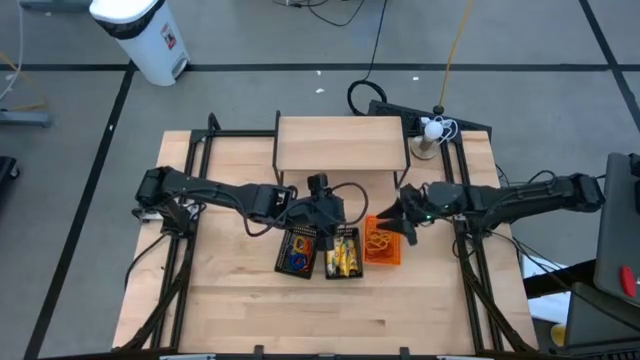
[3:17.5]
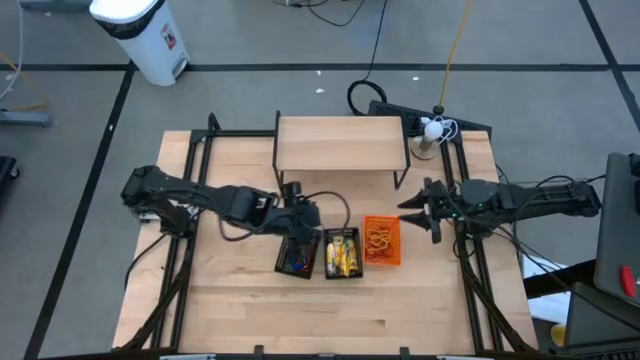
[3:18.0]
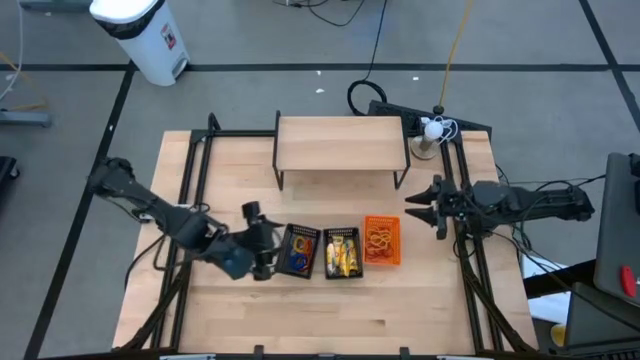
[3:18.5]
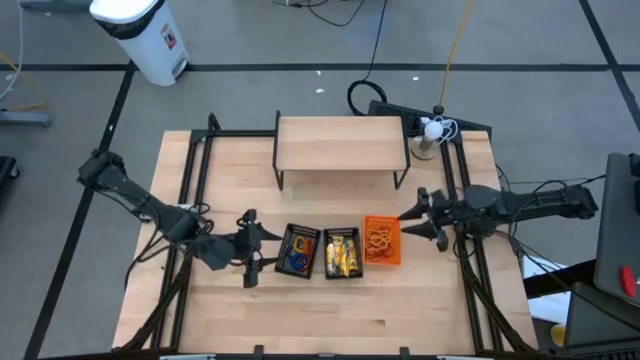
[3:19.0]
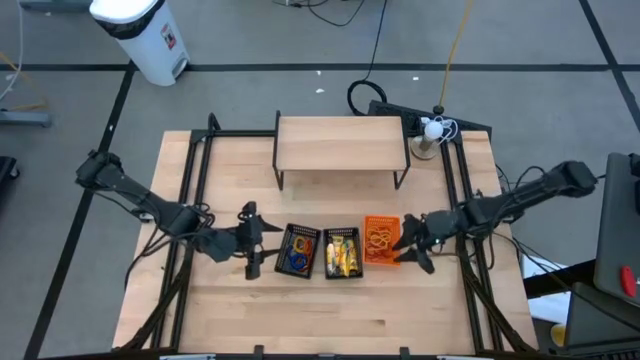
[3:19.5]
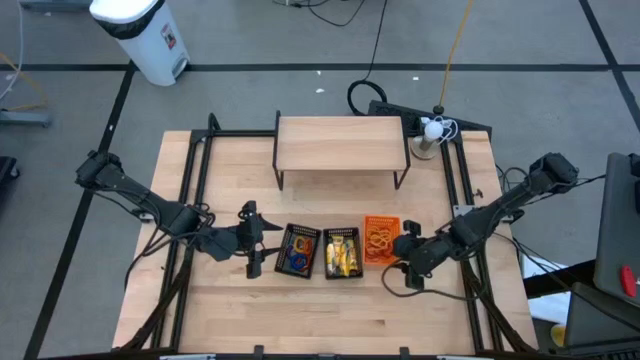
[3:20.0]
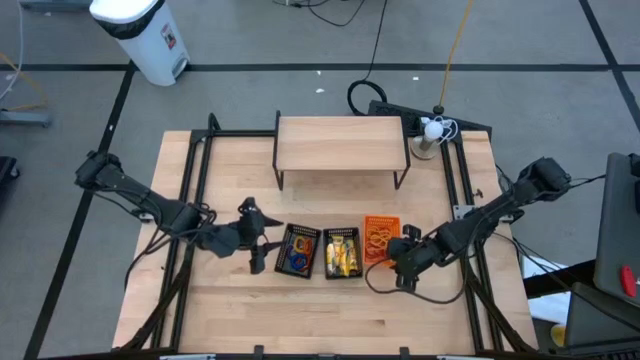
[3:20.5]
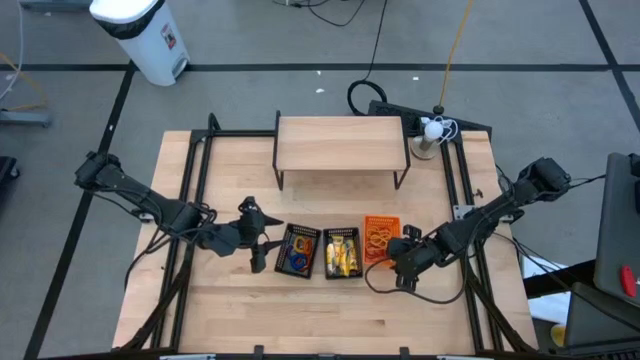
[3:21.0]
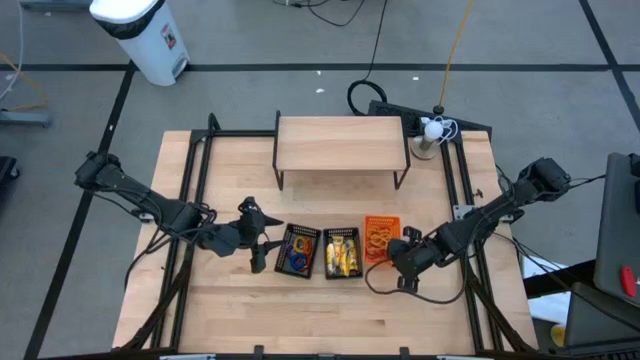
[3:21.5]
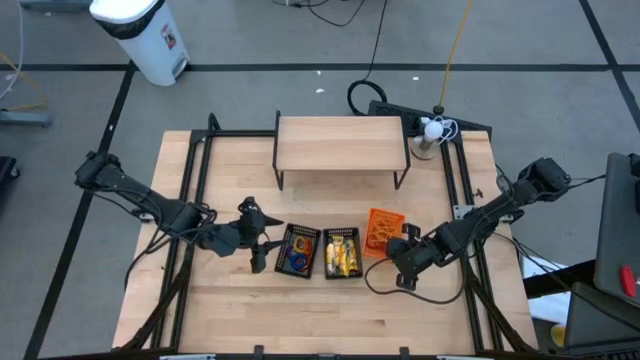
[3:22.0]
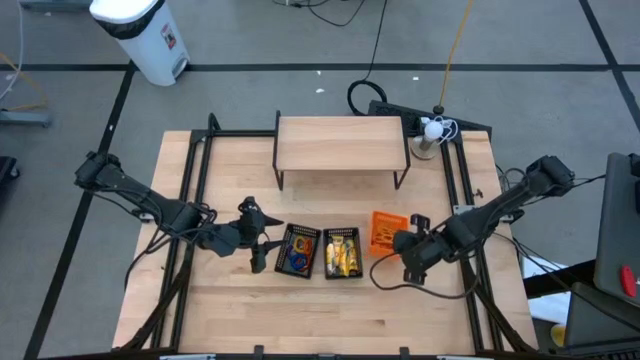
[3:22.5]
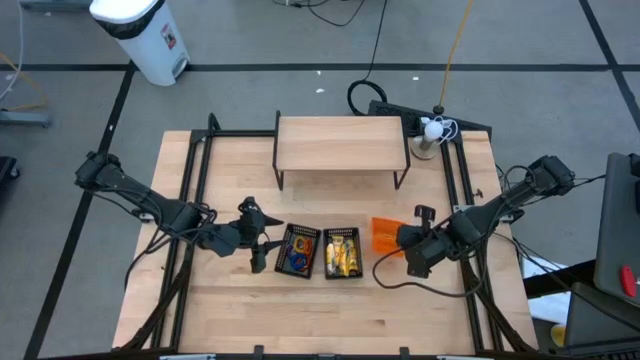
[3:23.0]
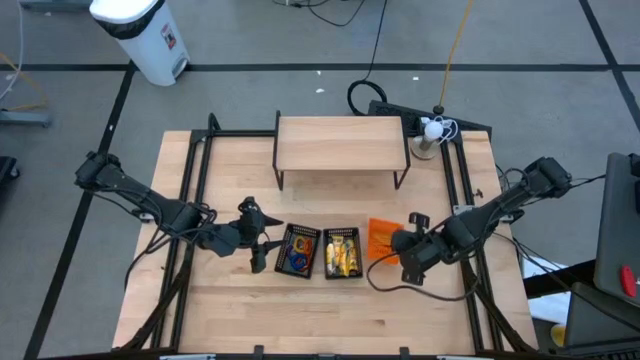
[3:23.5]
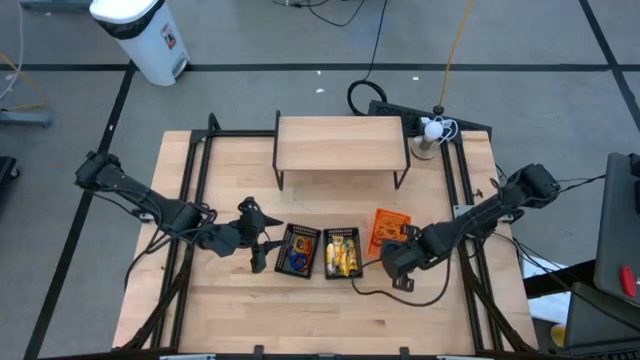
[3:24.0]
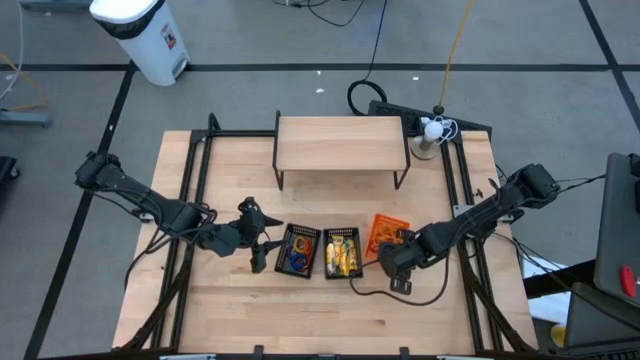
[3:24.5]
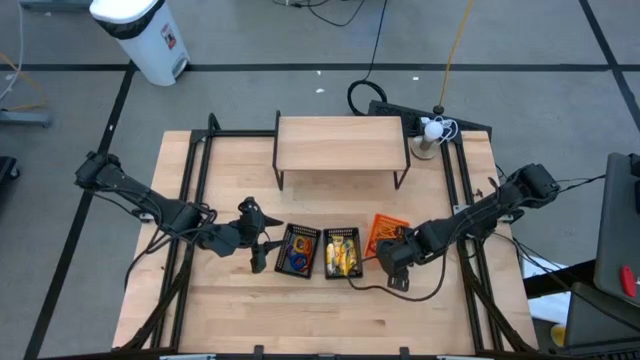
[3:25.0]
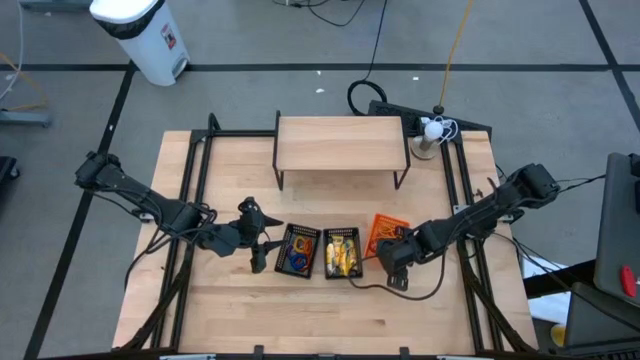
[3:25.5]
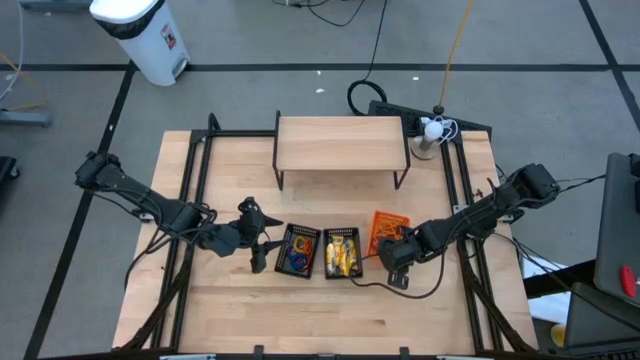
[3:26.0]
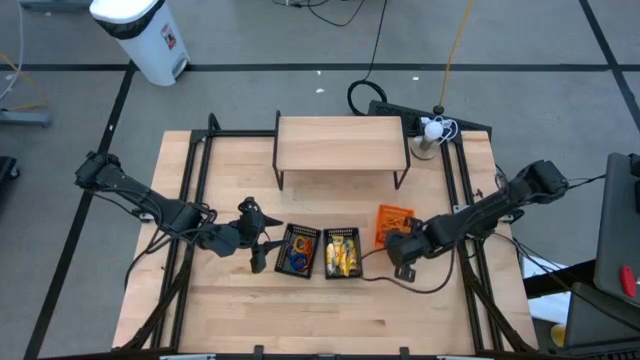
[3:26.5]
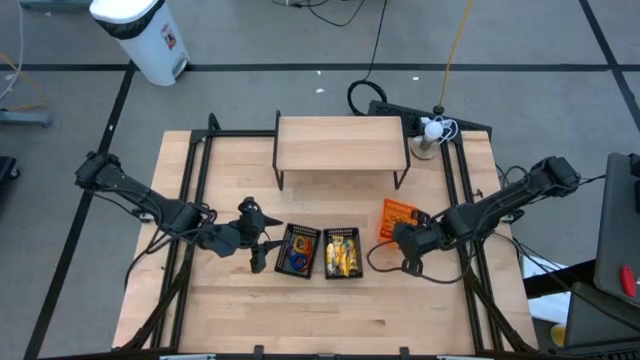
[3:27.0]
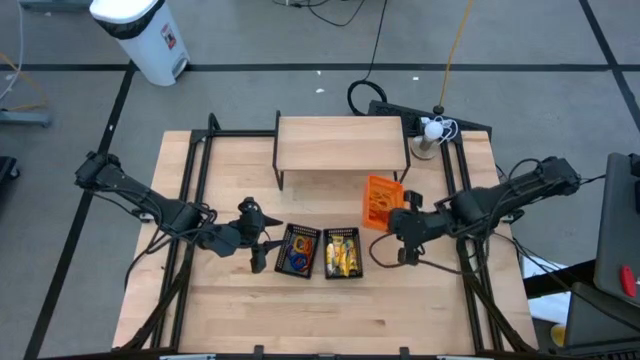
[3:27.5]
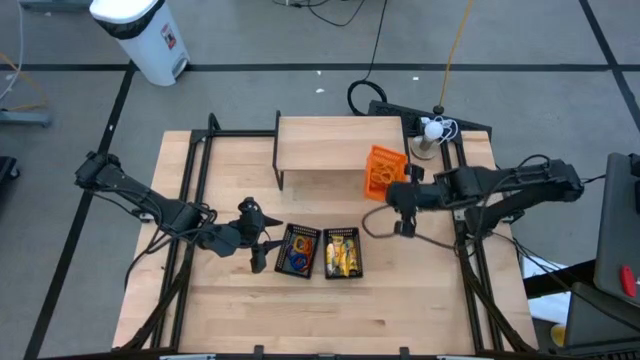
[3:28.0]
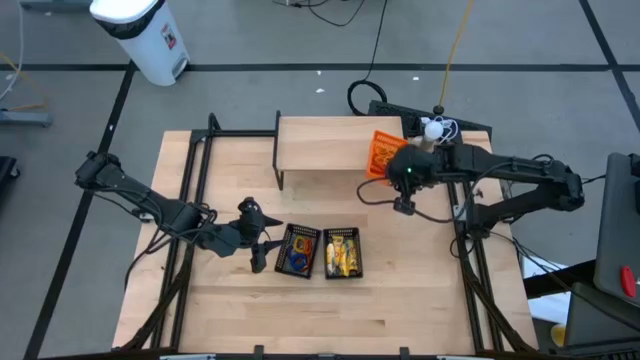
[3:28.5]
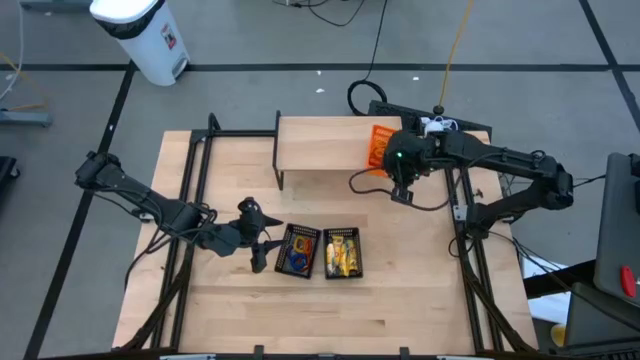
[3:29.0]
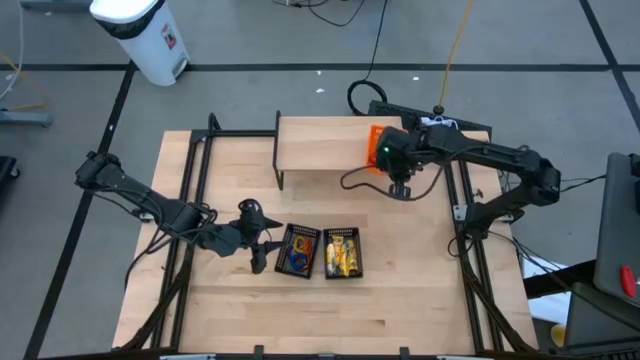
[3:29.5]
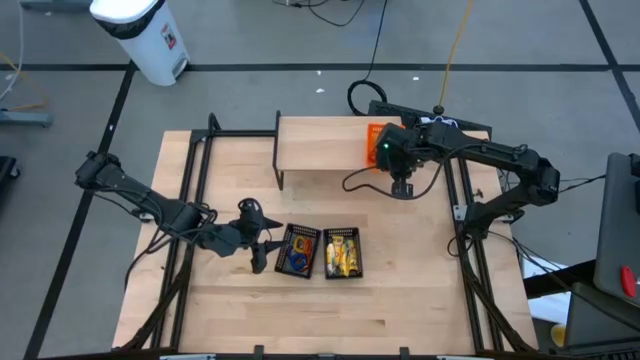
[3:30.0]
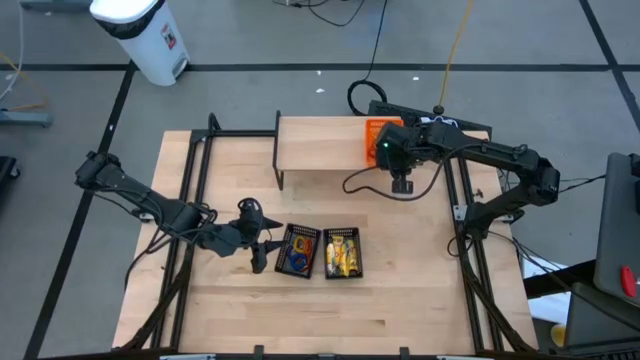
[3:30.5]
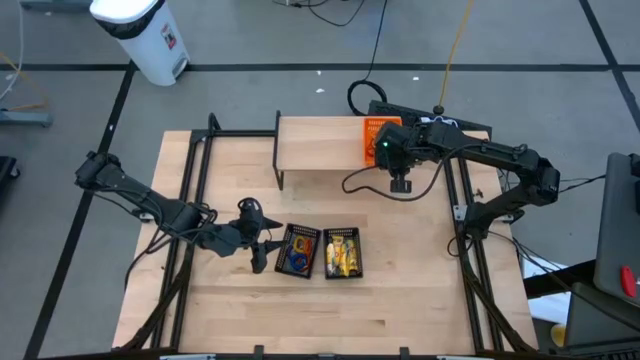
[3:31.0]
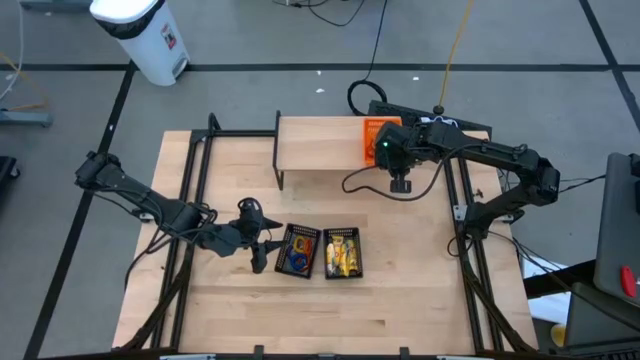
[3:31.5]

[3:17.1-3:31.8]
Task: Pick & Place Office Desk Supplies
Put the orange basket filled with rubber band on the shelf

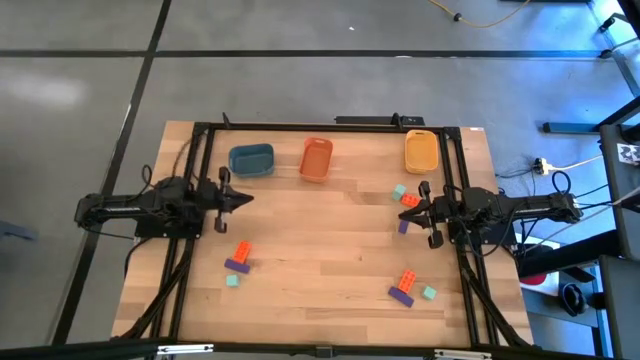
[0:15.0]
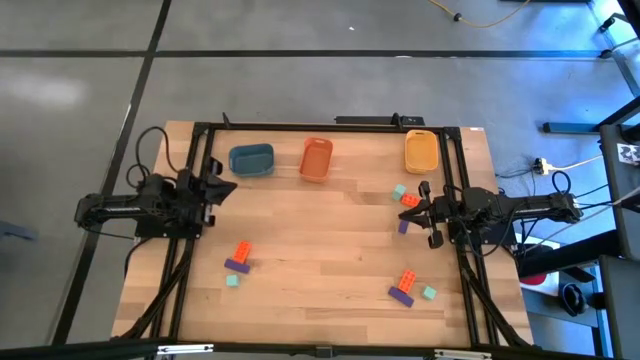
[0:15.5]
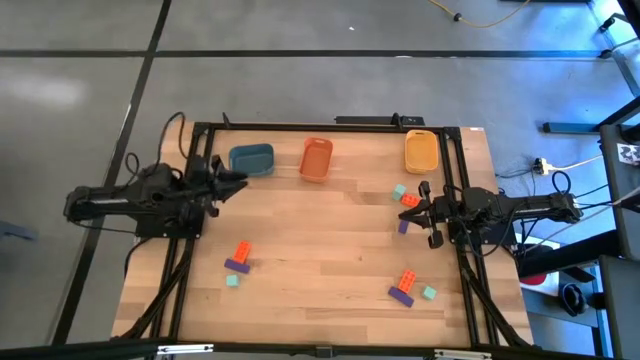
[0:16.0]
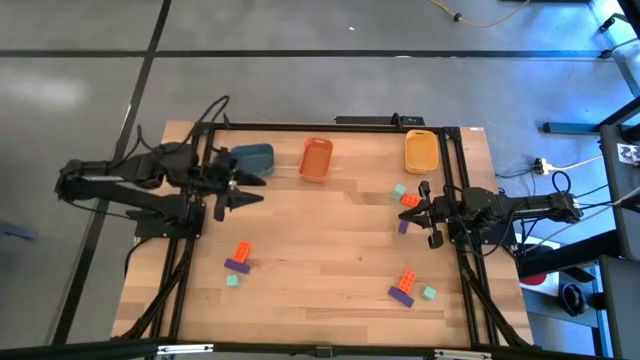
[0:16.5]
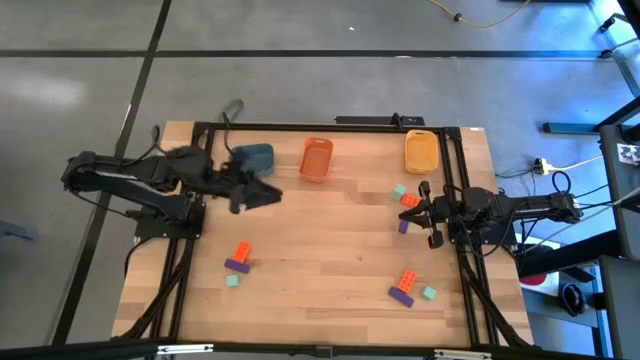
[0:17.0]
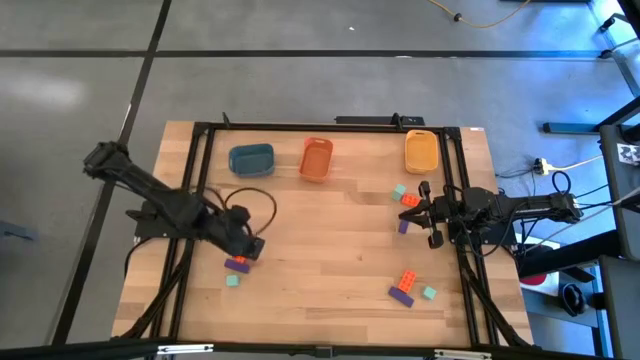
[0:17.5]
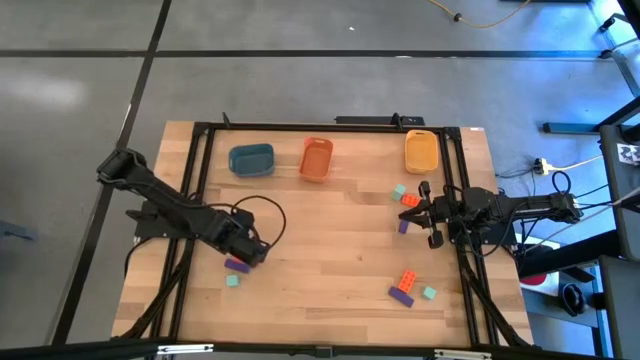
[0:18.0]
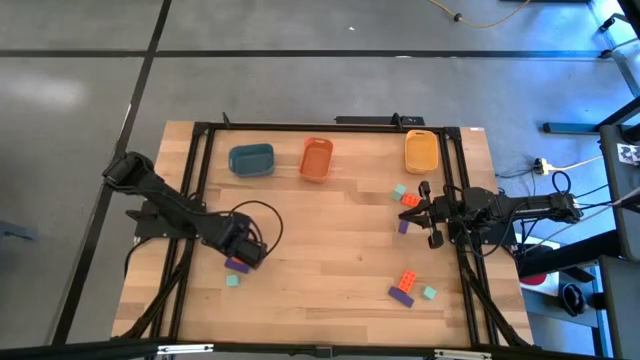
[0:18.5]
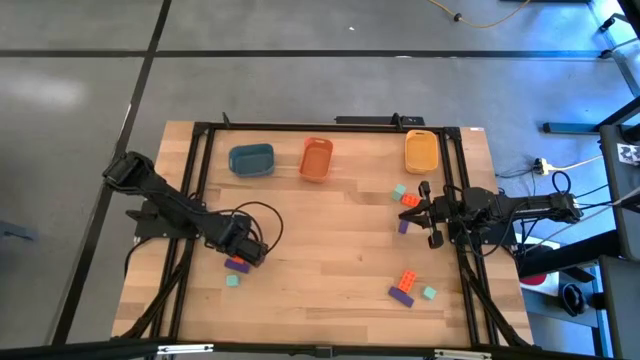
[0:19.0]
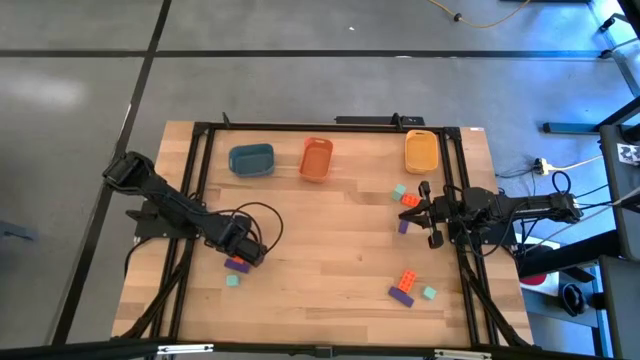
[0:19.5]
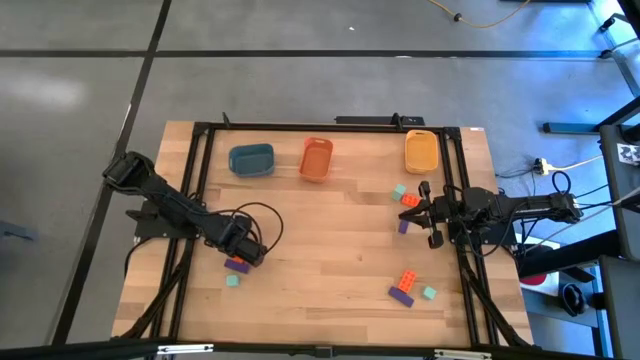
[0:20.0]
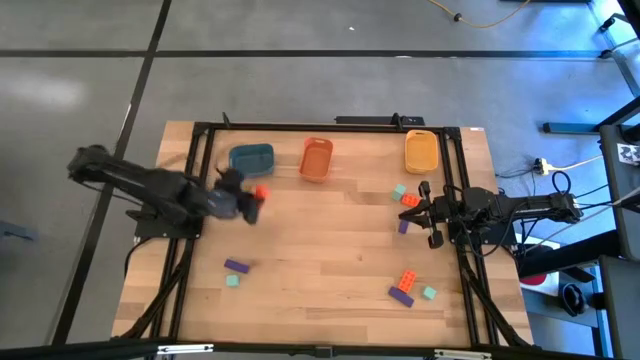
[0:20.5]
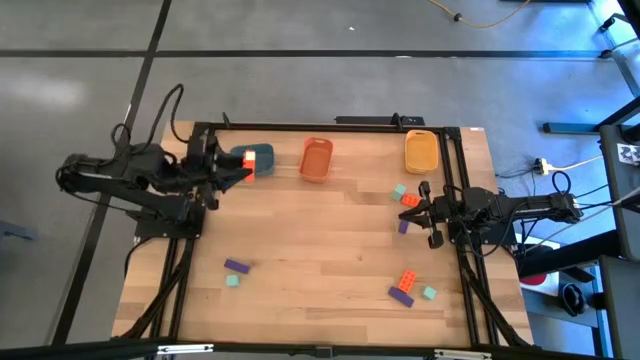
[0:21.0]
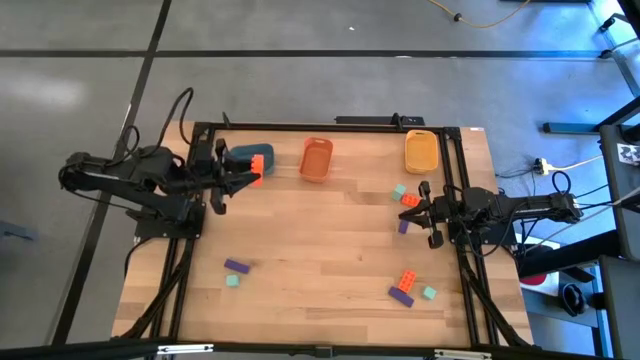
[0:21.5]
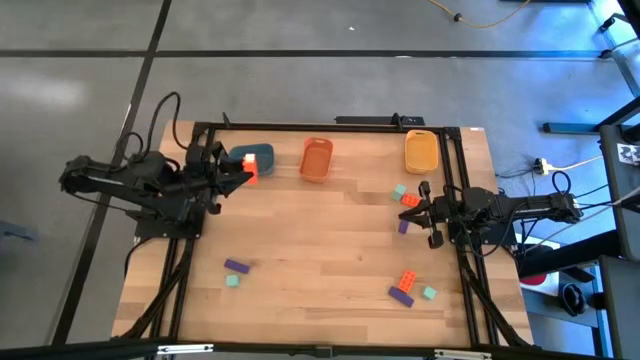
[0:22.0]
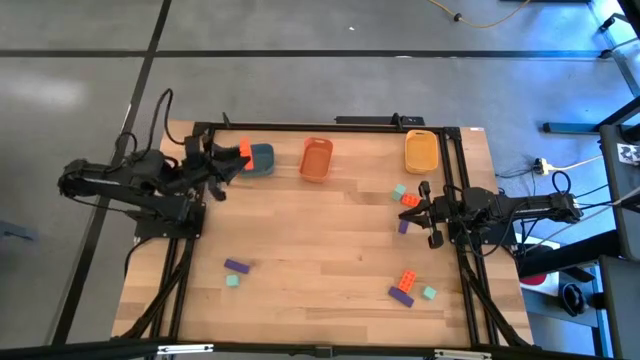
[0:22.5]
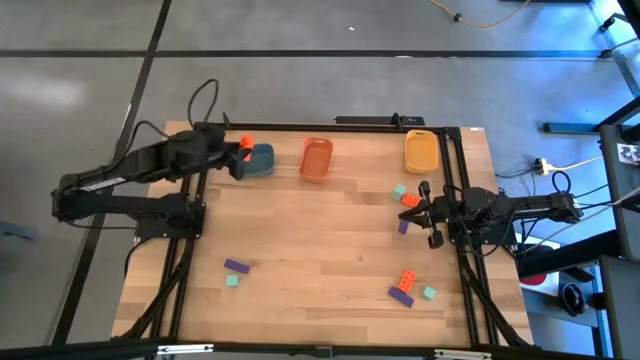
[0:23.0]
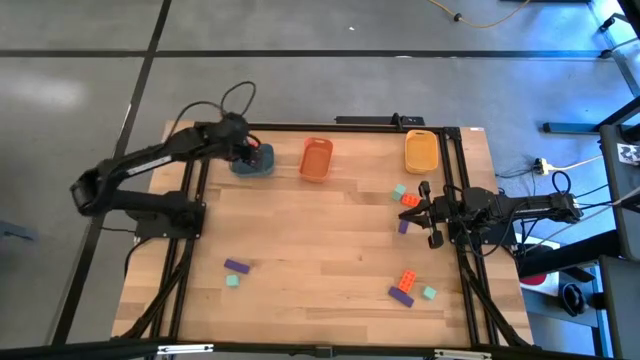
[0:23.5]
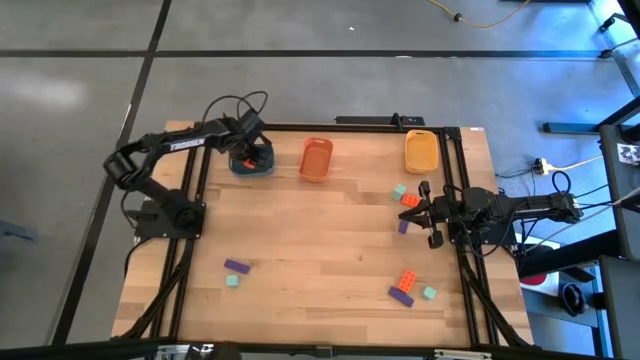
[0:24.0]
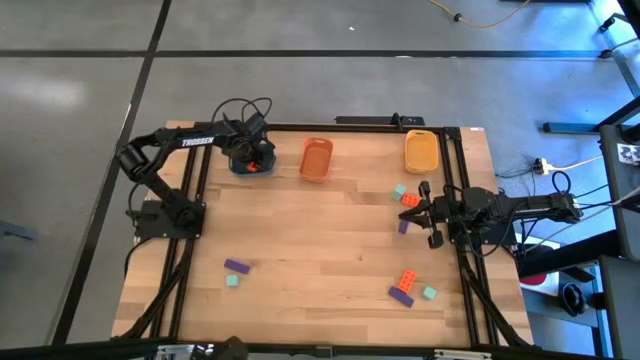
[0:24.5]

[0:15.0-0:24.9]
Task: Sort & place blocks by color
Put the bottom left orange gamepiece into the blue bin
